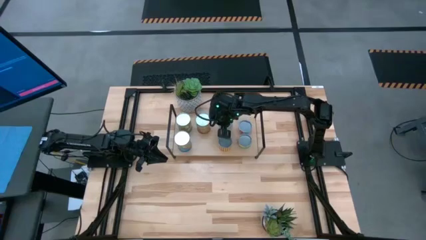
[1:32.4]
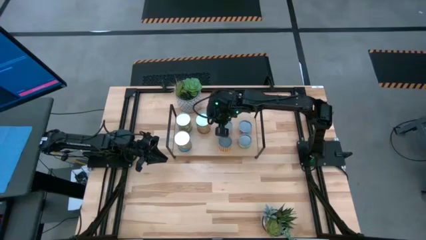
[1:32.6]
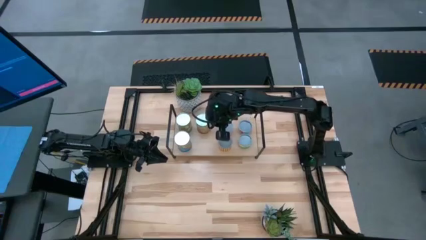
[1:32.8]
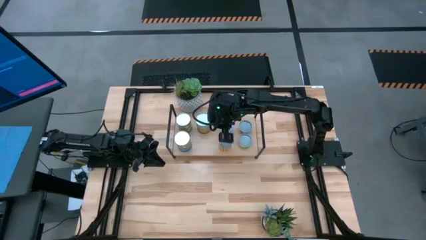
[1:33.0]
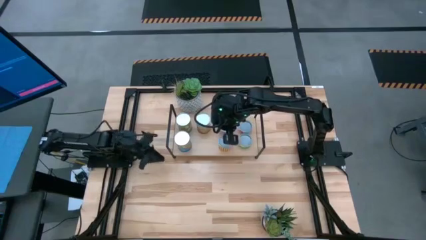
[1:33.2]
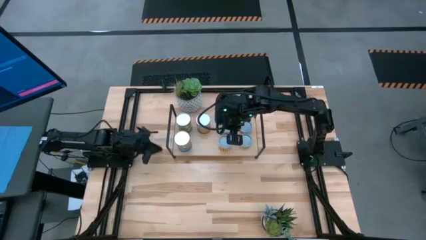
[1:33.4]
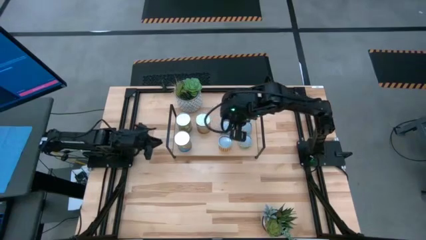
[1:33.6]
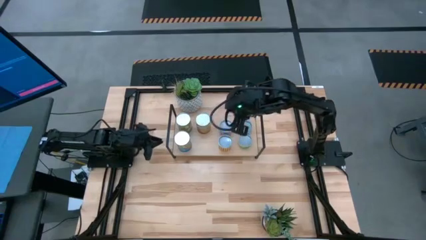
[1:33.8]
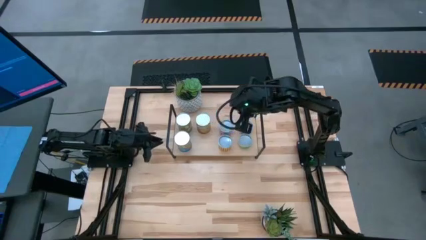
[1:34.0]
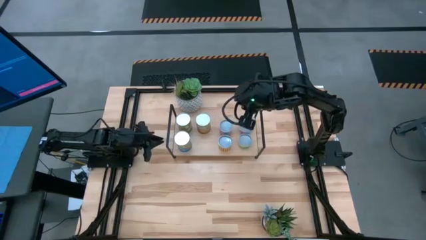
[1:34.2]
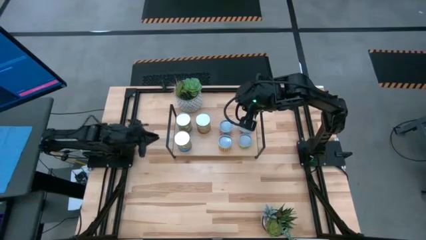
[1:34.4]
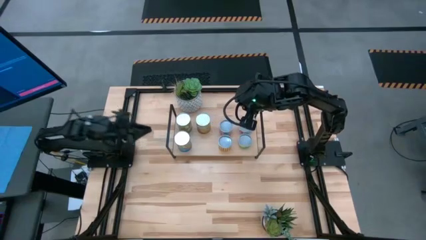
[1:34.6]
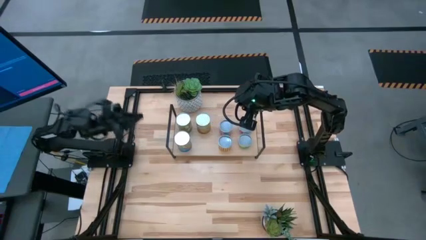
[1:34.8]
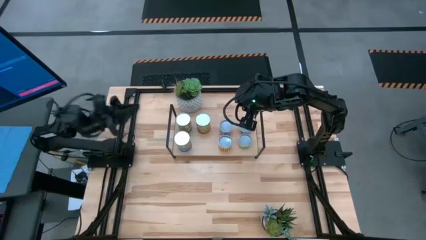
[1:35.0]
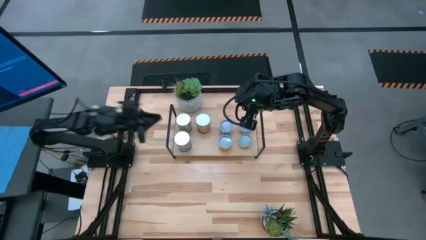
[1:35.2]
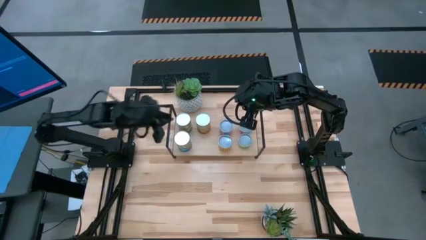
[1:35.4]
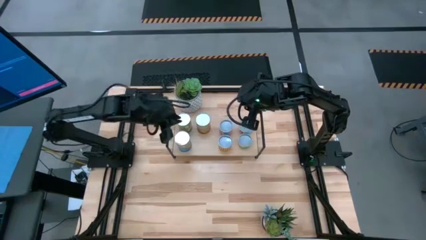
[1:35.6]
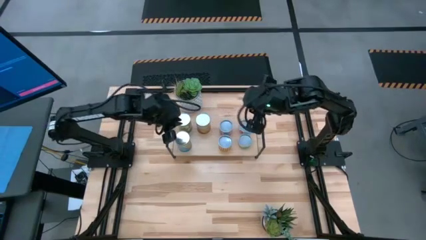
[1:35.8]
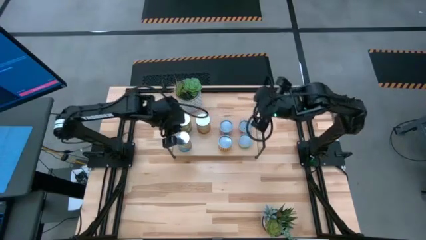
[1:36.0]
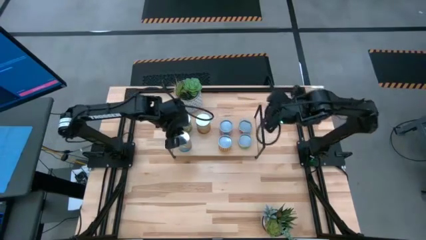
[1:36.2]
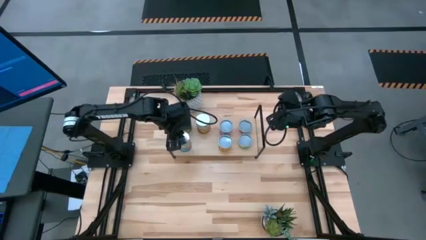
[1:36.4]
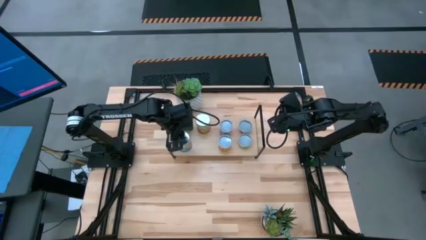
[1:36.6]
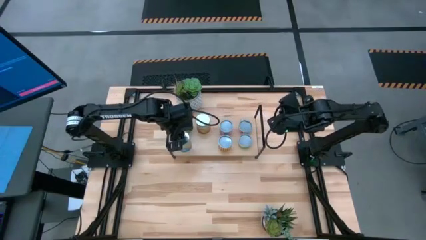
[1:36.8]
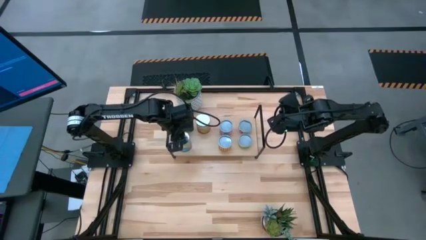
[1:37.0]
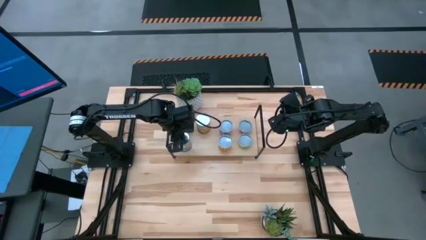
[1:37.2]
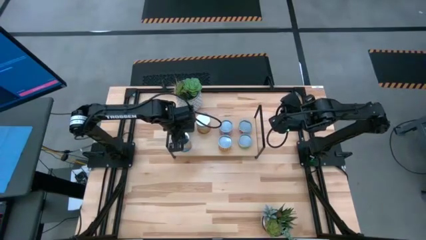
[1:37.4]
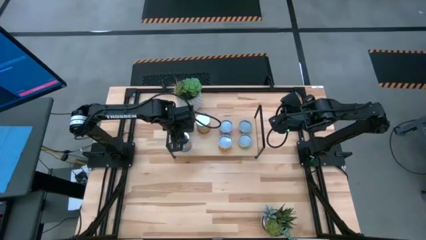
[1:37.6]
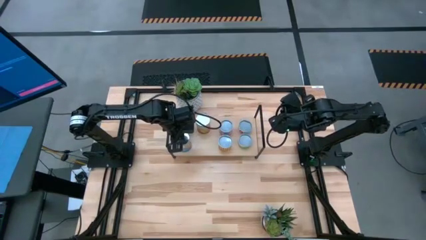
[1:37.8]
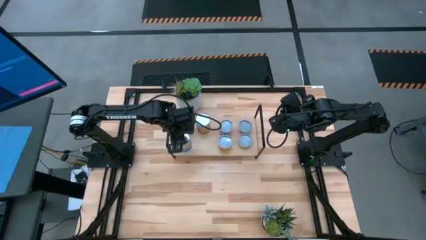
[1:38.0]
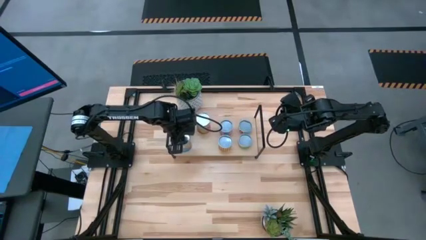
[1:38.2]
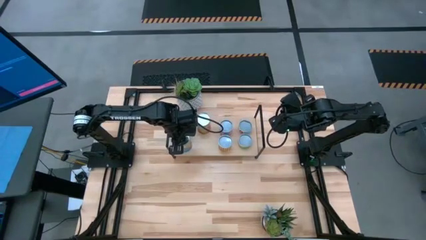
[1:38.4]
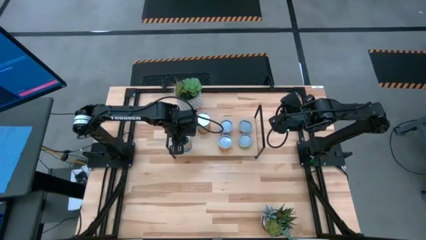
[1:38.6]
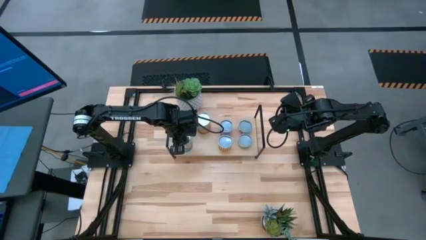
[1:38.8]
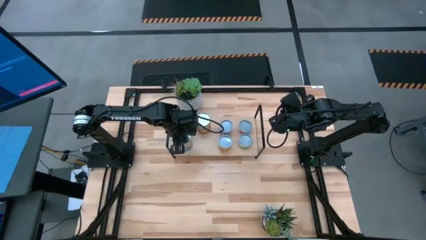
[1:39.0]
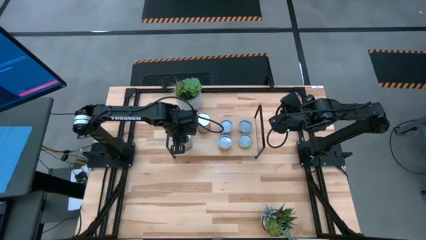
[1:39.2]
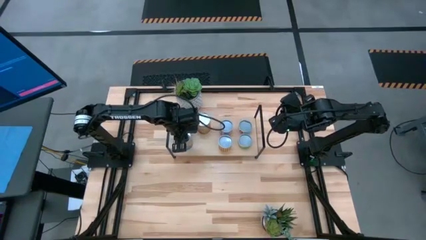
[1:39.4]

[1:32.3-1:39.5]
Task: Pick and place cans onto a shelf
Adjust the canned tomatoes

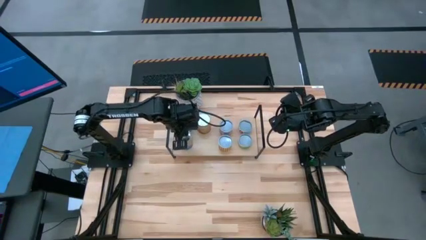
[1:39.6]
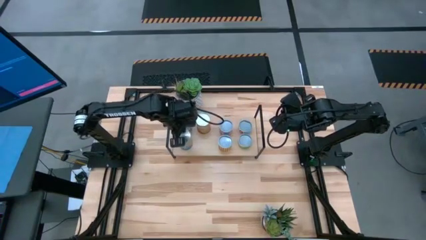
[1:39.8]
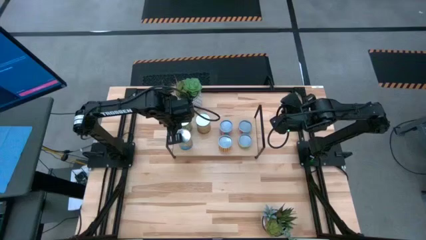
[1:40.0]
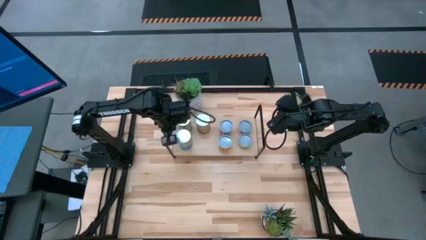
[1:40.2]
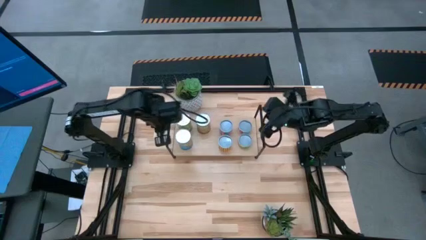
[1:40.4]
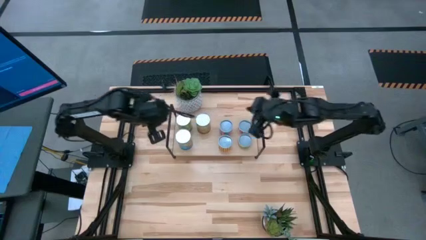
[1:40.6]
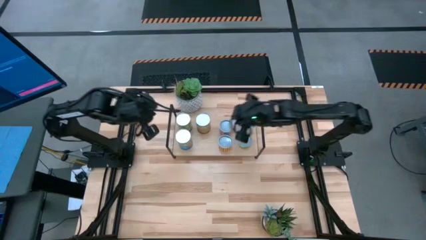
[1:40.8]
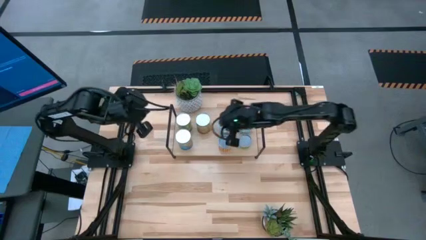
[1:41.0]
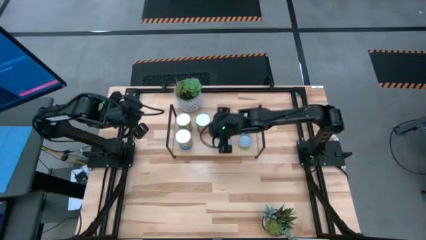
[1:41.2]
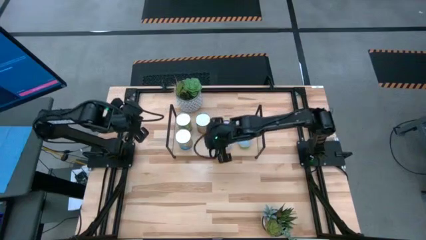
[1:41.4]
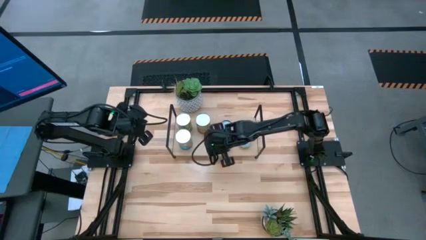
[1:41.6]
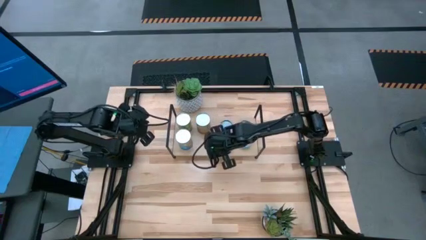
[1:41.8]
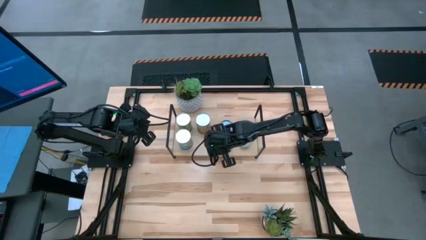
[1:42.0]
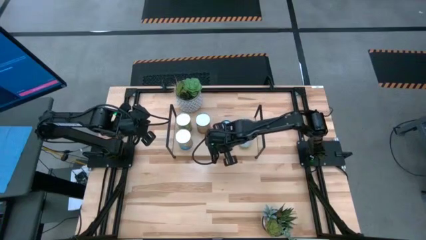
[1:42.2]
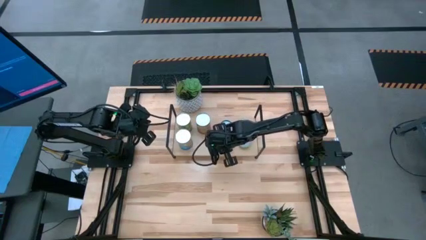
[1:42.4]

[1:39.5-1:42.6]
Adjust the canned spicy black beans

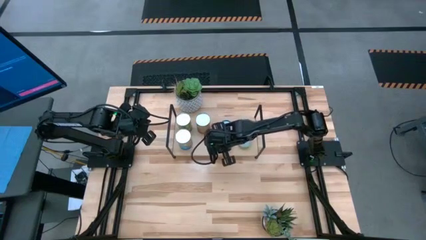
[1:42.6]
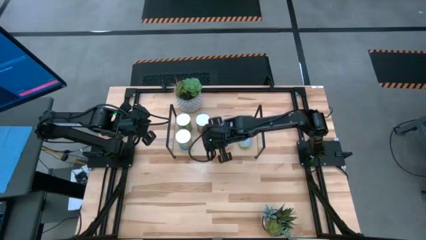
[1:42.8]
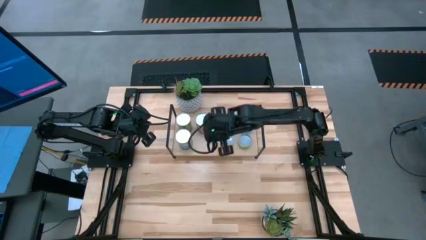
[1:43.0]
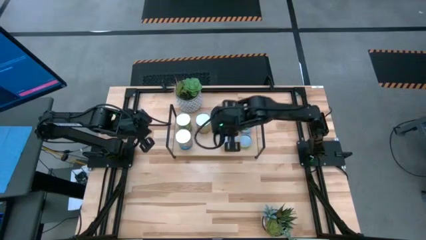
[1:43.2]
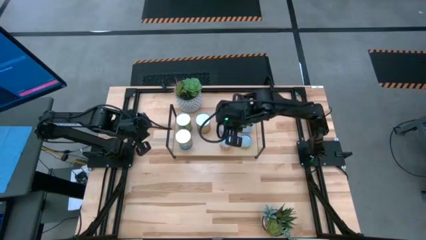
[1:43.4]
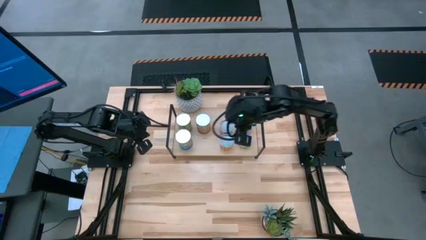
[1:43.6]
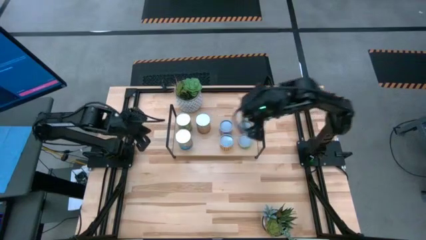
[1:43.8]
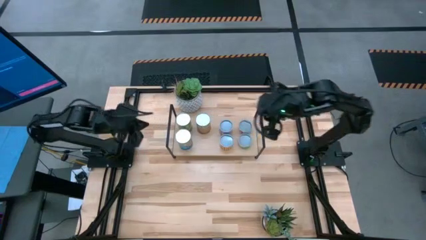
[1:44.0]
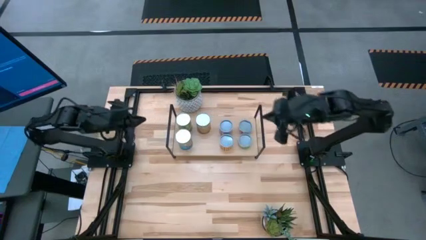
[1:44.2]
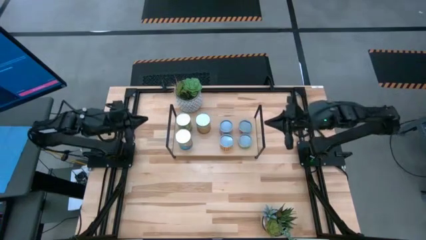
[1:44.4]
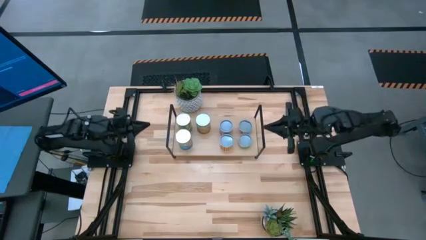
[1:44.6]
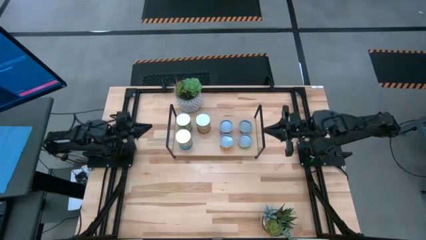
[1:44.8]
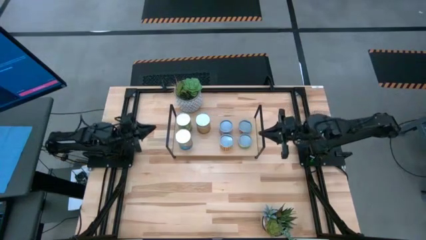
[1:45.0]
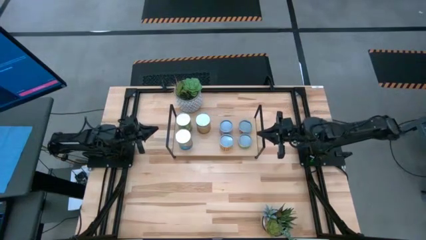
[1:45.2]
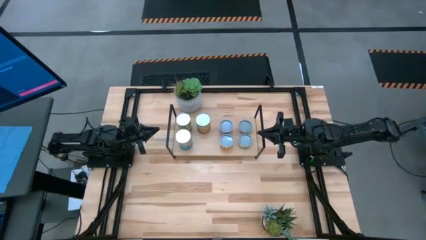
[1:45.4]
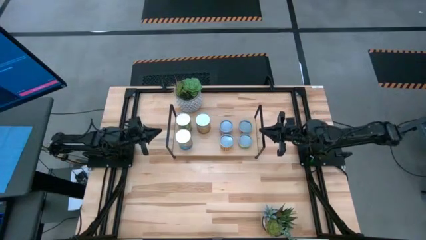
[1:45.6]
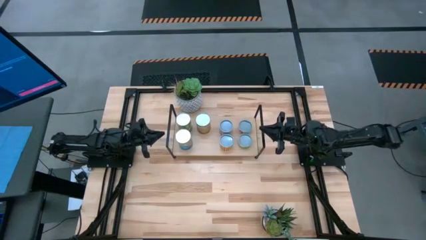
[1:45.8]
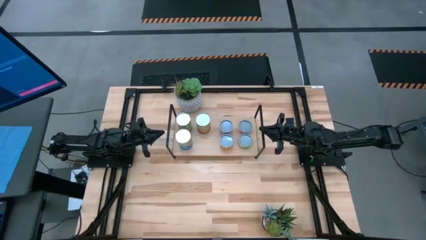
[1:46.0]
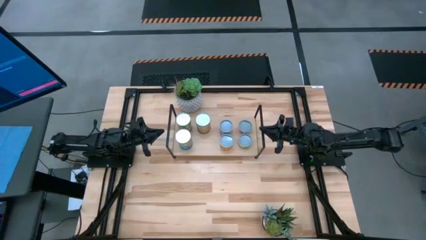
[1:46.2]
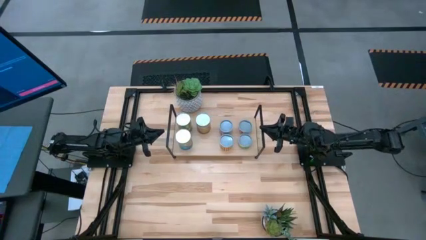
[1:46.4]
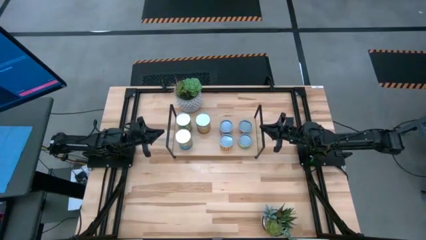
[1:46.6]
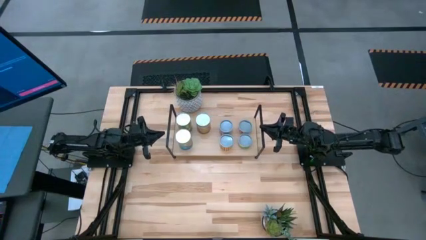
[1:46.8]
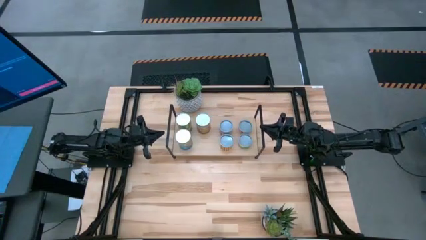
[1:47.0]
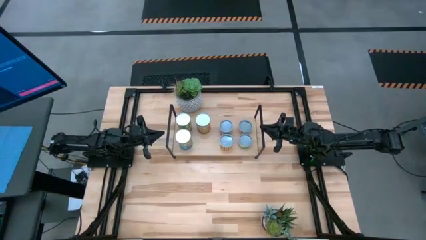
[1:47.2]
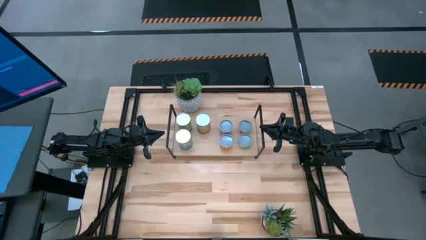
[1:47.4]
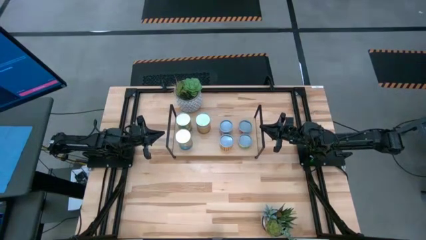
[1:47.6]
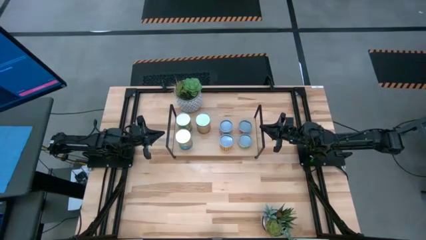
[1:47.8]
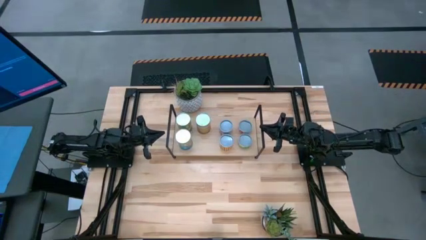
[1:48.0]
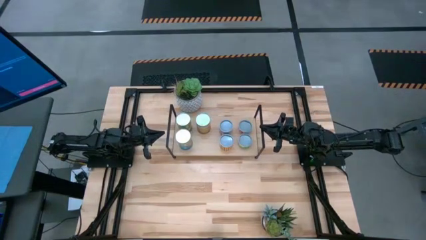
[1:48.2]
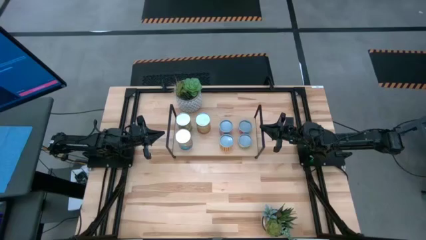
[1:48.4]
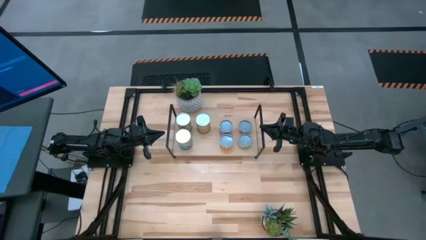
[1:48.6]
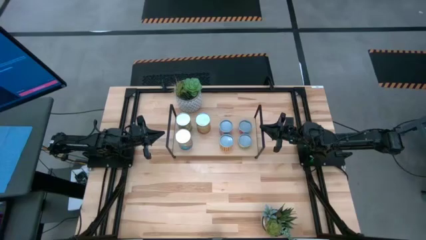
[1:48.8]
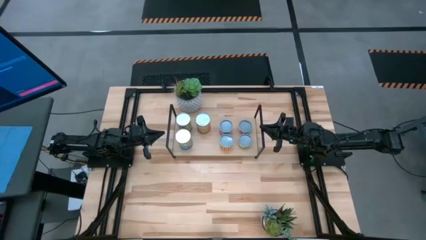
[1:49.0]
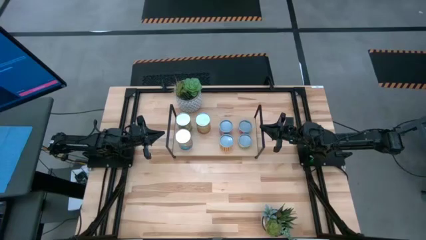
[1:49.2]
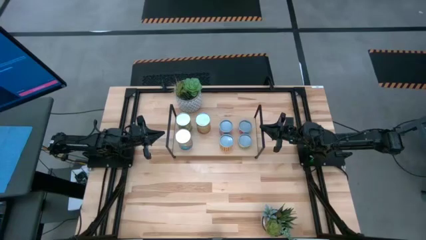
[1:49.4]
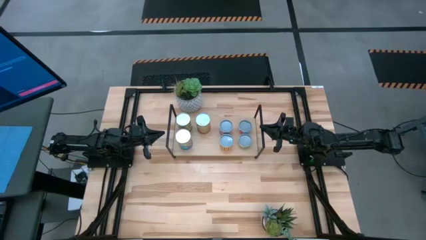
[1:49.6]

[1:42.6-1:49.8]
Return to home position
